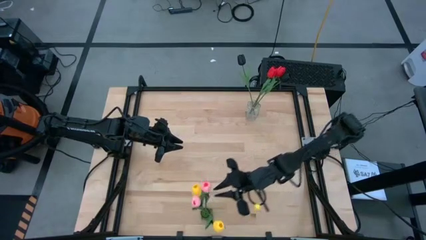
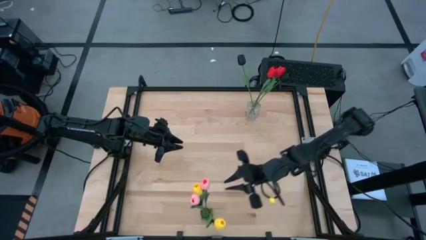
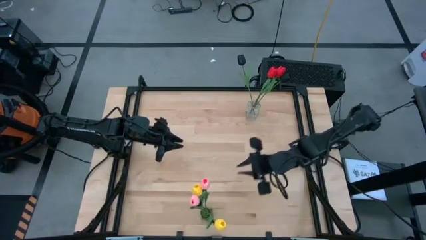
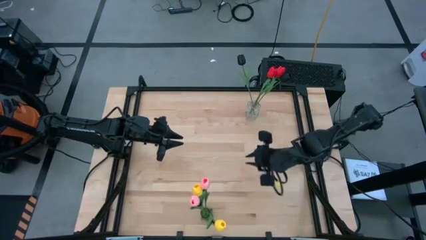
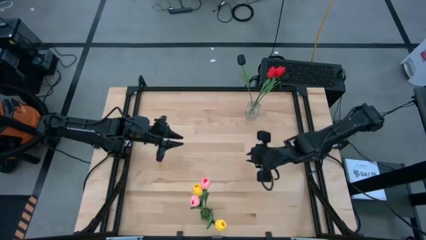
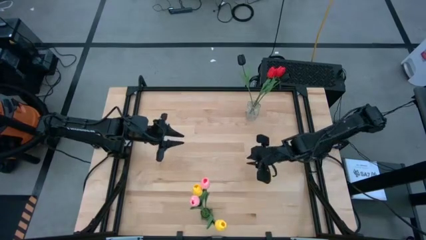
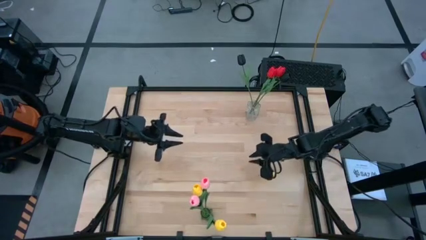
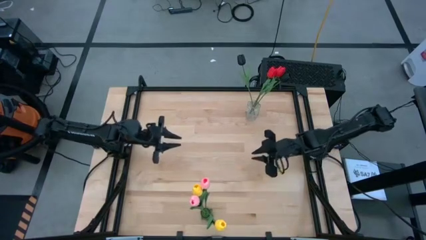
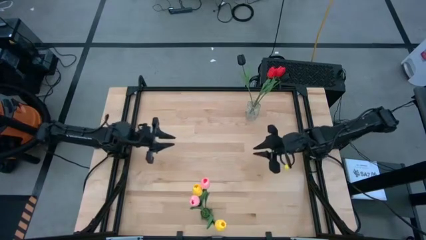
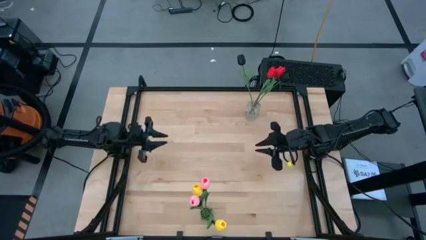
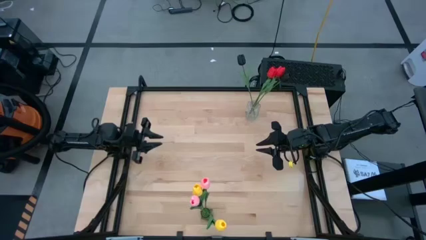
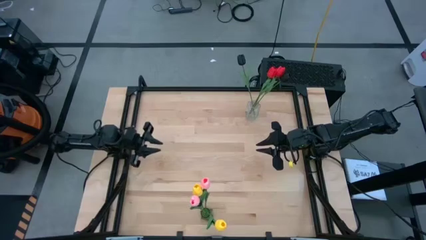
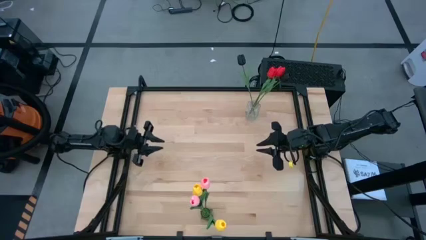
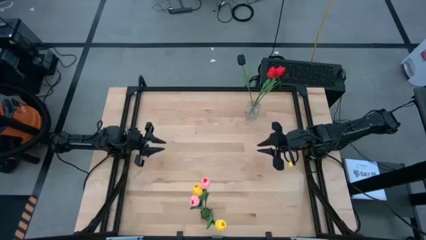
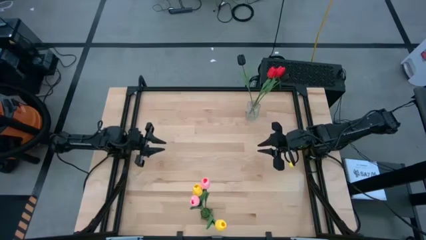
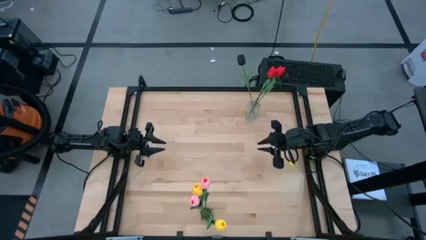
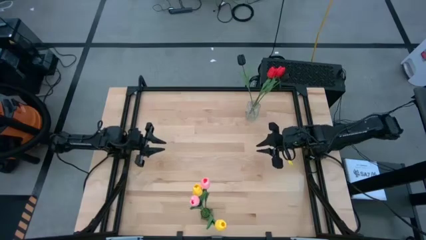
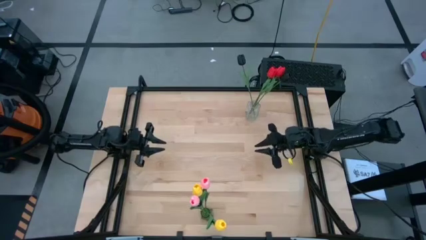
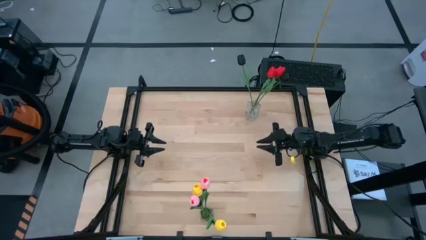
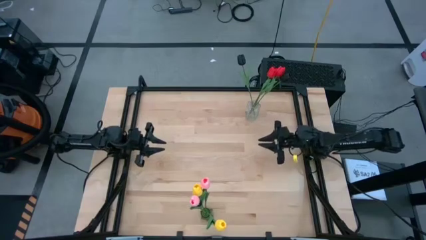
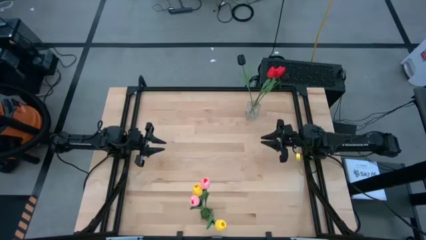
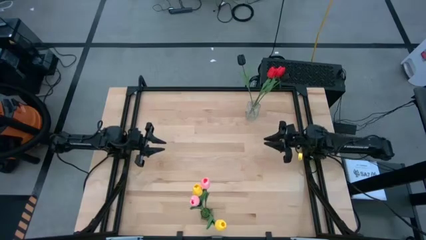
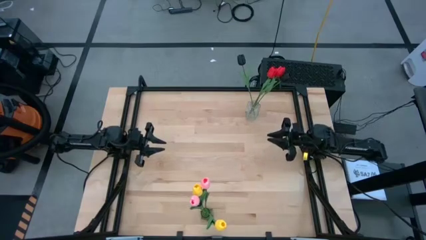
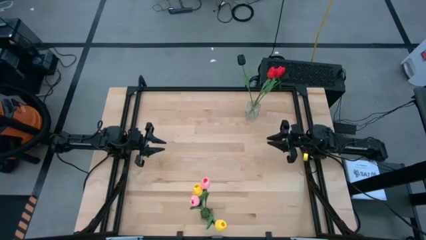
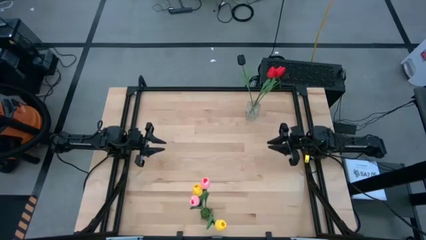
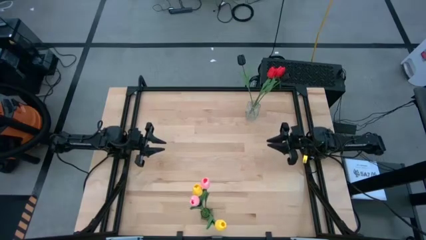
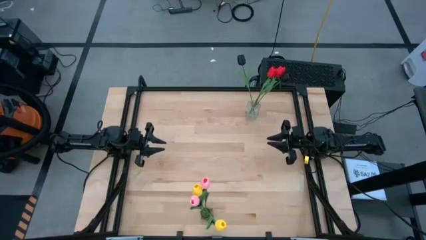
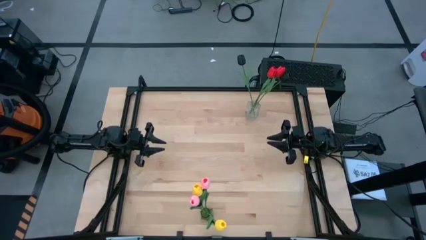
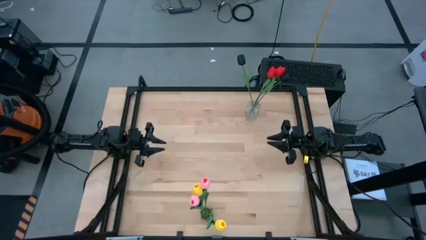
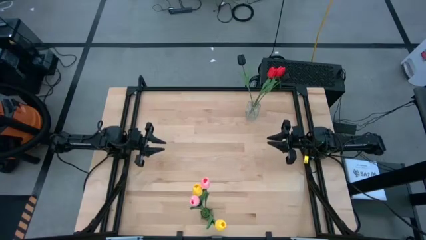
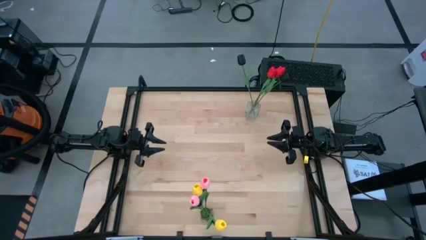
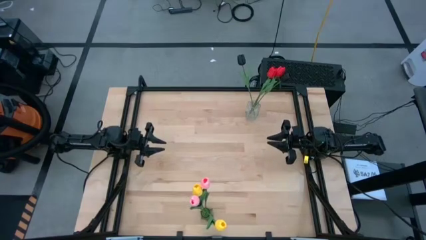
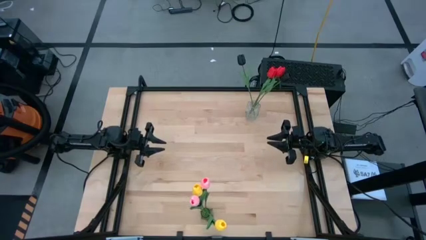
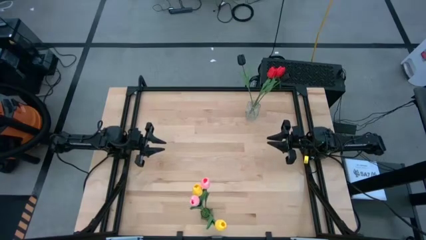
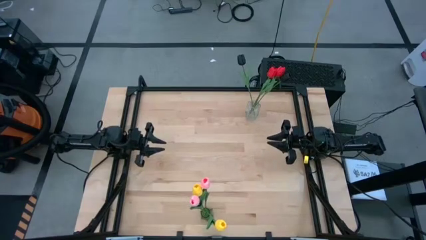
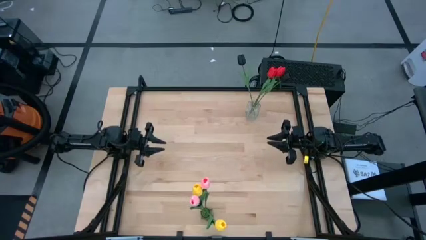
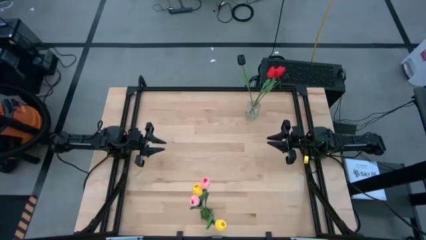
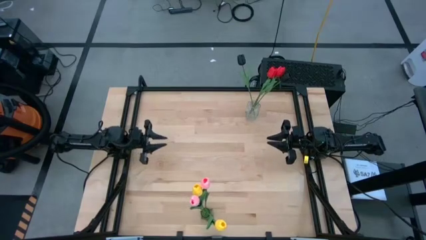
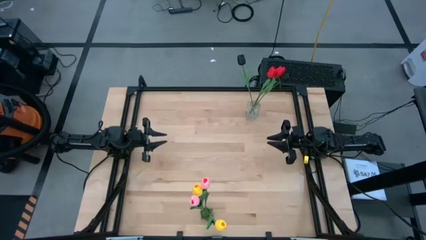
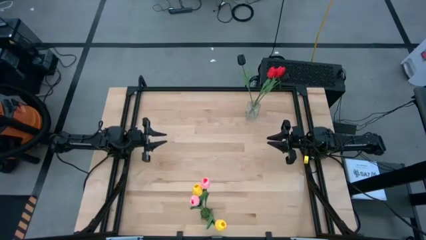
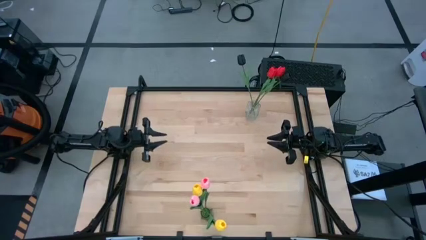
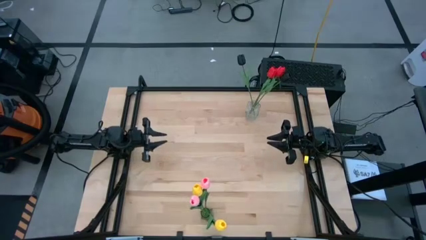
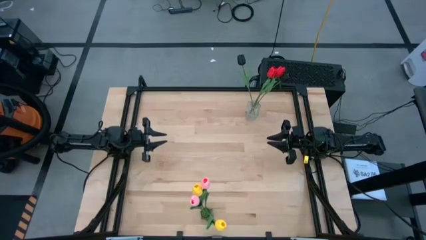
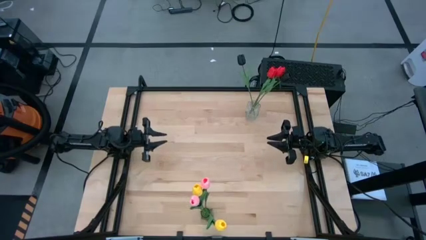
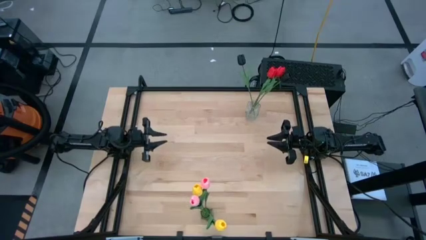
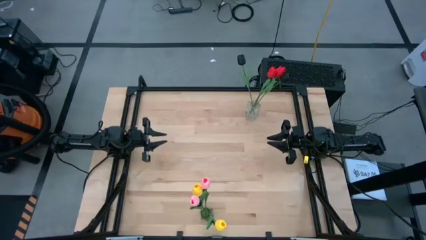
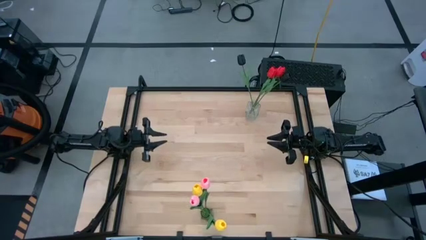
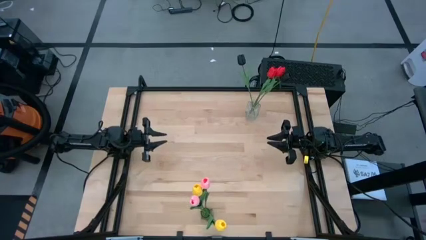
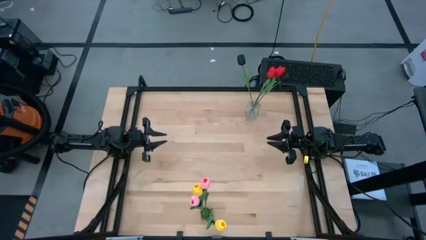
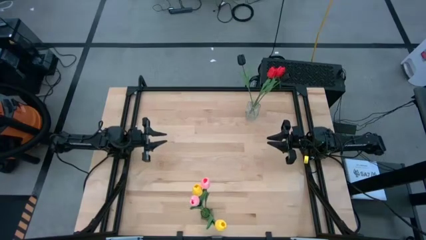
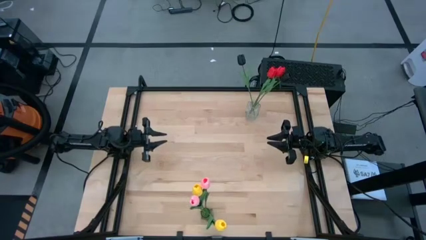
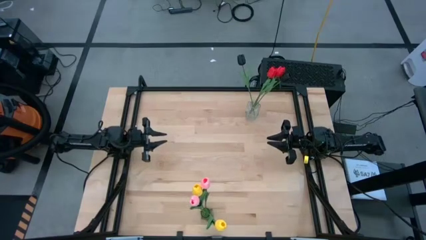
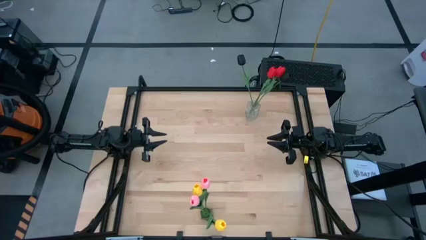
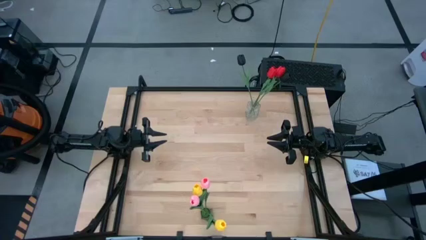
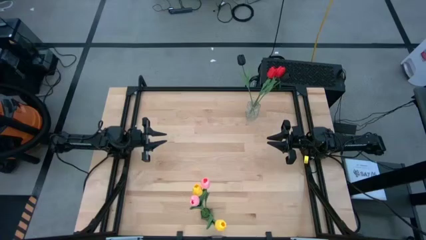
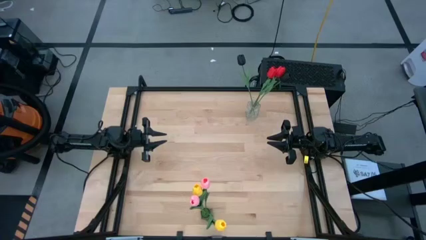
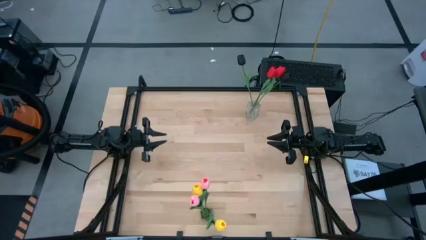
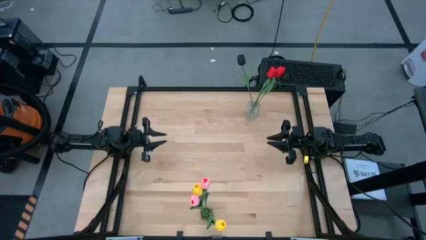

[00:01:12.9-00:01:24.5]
Task: Sort flowers into vase by color
Return to Home Position
